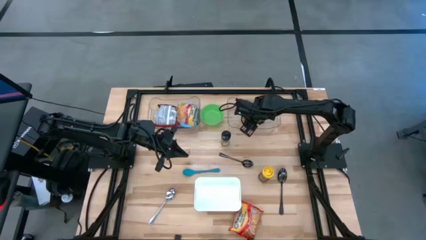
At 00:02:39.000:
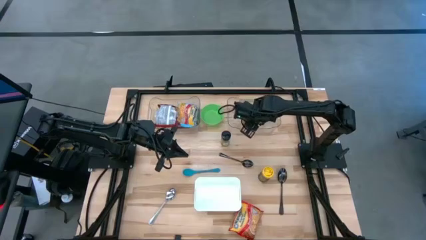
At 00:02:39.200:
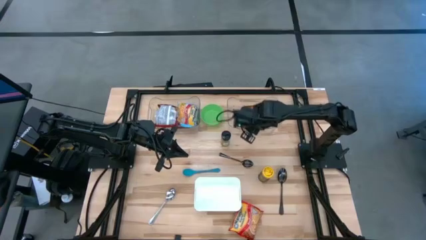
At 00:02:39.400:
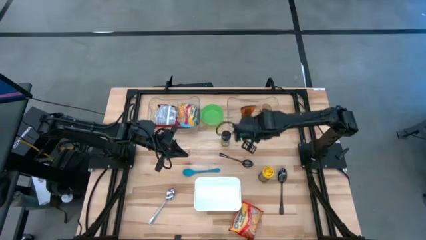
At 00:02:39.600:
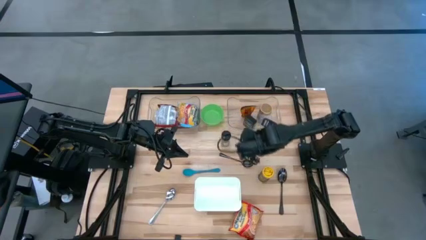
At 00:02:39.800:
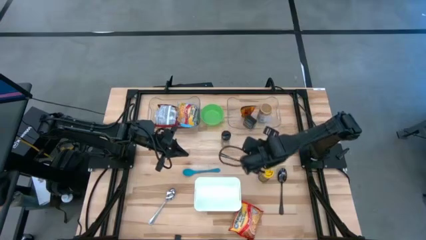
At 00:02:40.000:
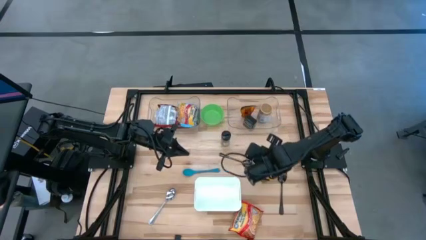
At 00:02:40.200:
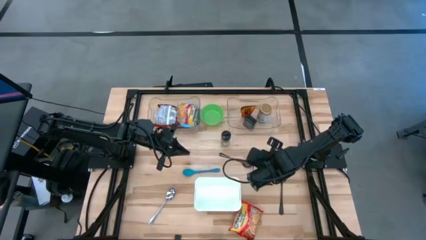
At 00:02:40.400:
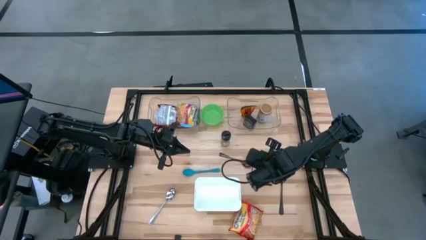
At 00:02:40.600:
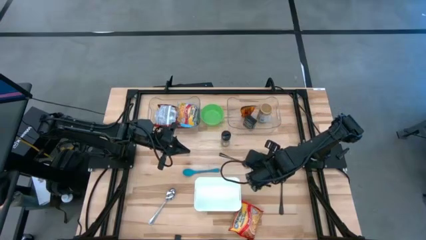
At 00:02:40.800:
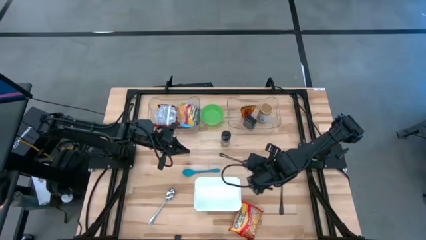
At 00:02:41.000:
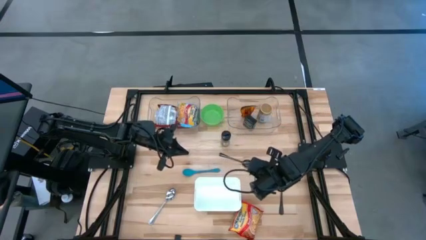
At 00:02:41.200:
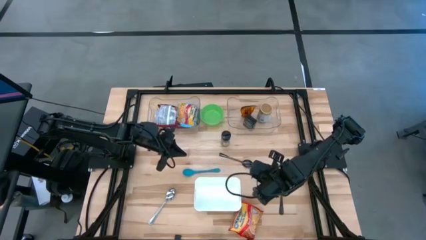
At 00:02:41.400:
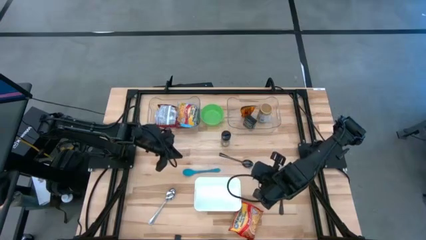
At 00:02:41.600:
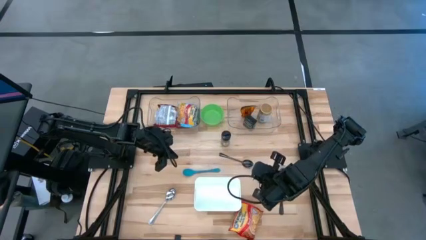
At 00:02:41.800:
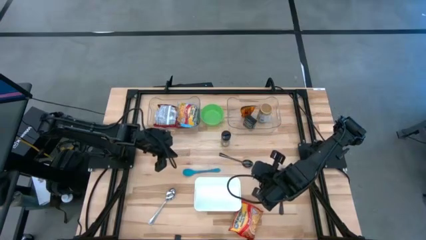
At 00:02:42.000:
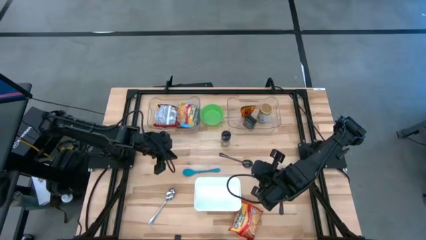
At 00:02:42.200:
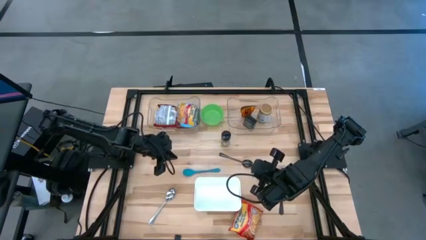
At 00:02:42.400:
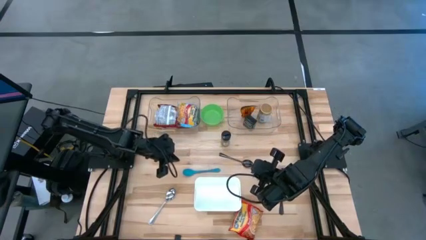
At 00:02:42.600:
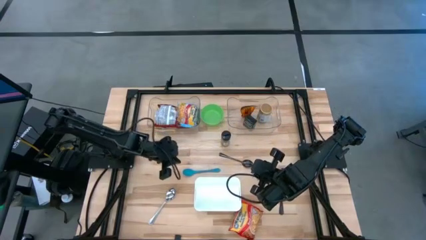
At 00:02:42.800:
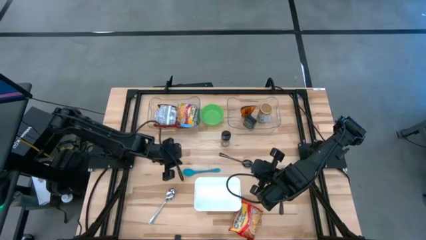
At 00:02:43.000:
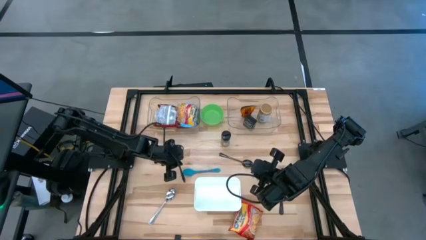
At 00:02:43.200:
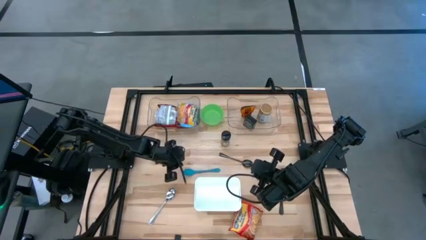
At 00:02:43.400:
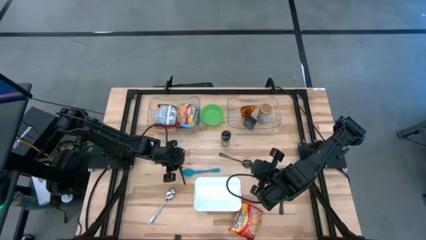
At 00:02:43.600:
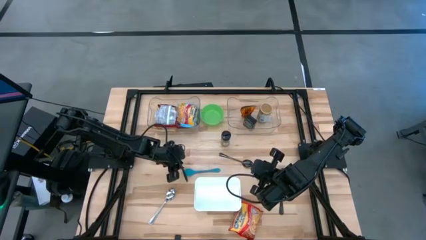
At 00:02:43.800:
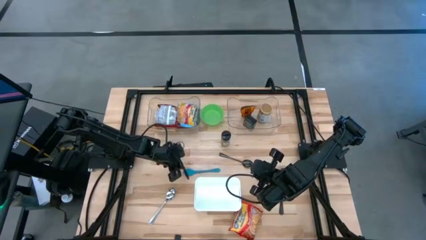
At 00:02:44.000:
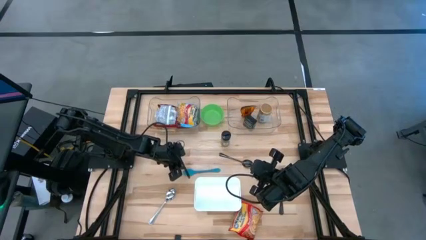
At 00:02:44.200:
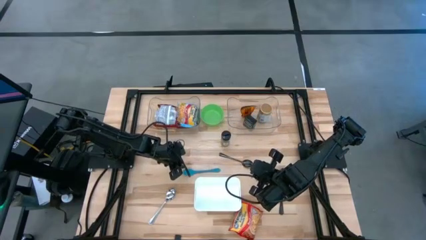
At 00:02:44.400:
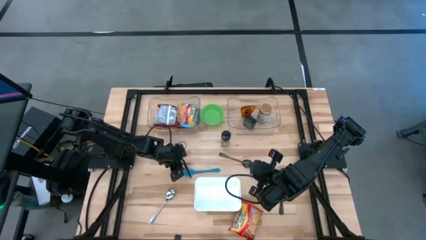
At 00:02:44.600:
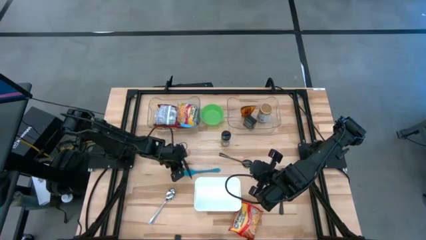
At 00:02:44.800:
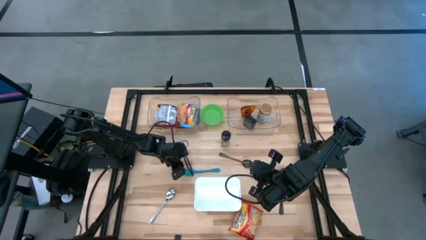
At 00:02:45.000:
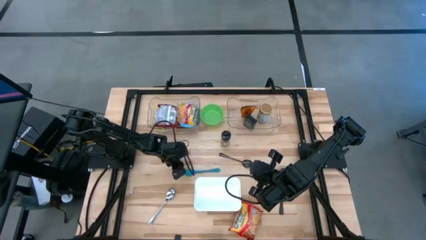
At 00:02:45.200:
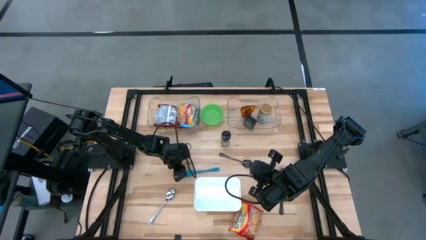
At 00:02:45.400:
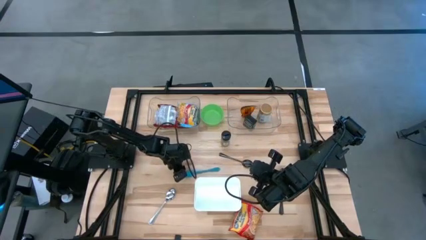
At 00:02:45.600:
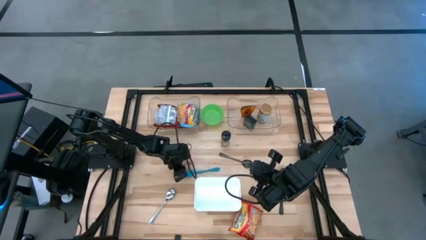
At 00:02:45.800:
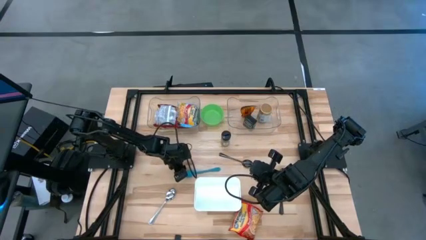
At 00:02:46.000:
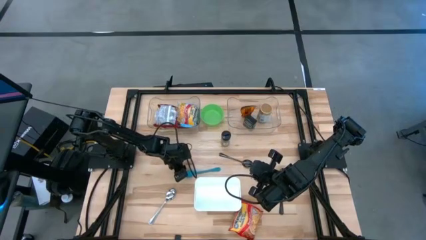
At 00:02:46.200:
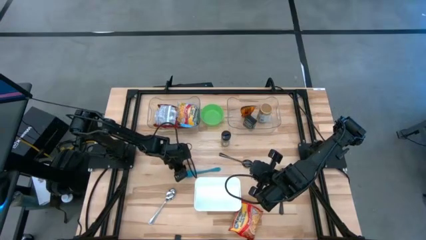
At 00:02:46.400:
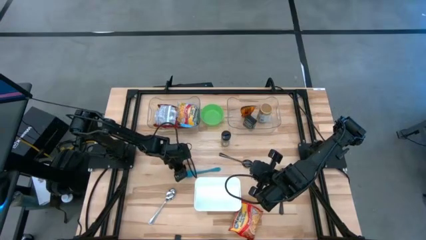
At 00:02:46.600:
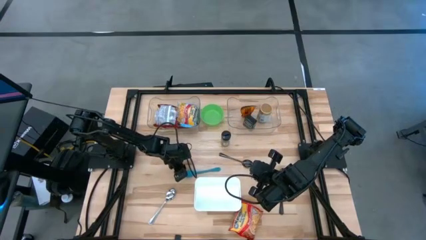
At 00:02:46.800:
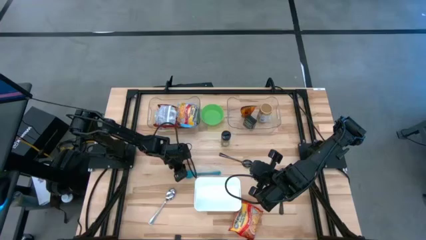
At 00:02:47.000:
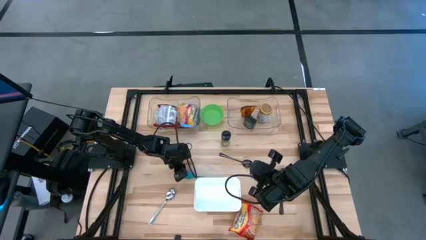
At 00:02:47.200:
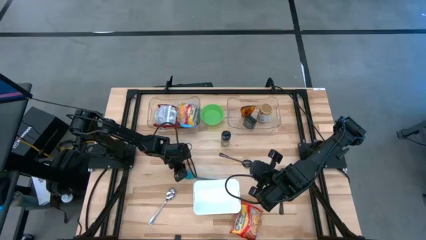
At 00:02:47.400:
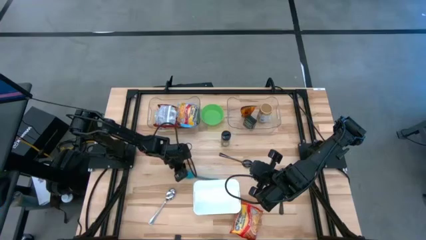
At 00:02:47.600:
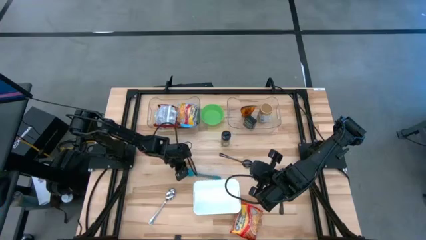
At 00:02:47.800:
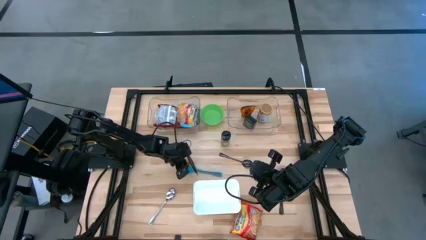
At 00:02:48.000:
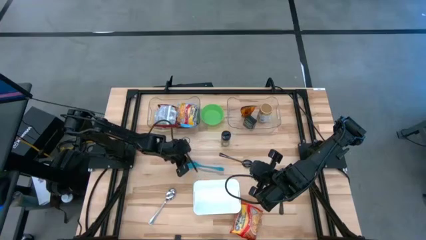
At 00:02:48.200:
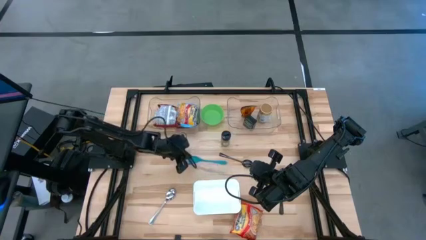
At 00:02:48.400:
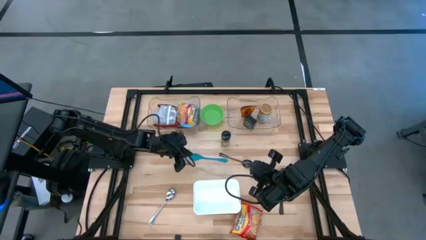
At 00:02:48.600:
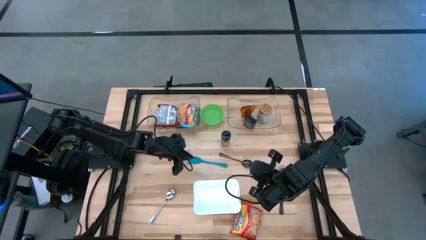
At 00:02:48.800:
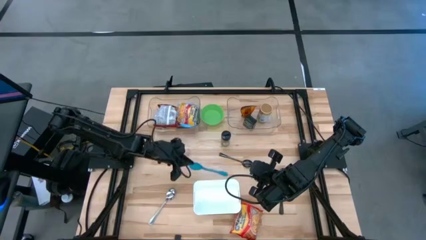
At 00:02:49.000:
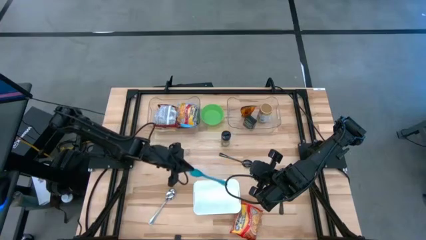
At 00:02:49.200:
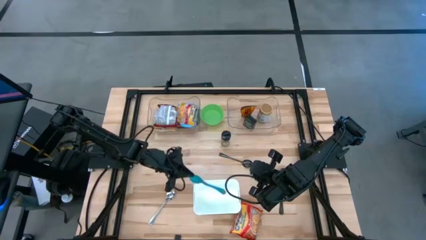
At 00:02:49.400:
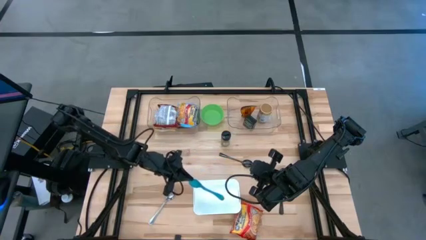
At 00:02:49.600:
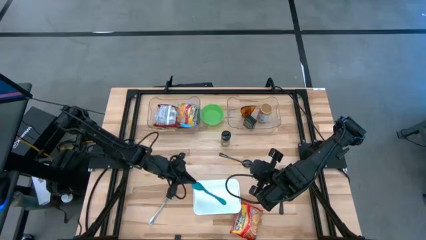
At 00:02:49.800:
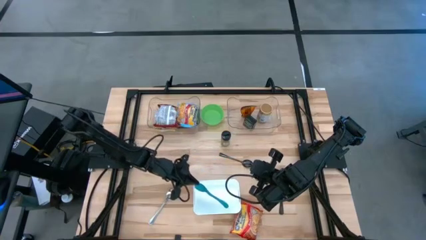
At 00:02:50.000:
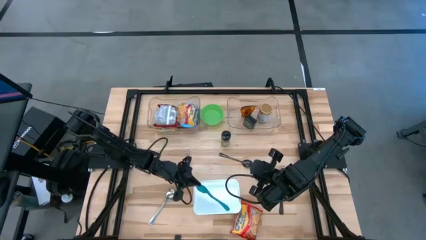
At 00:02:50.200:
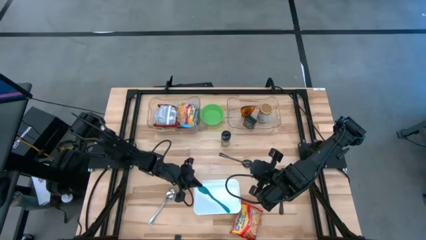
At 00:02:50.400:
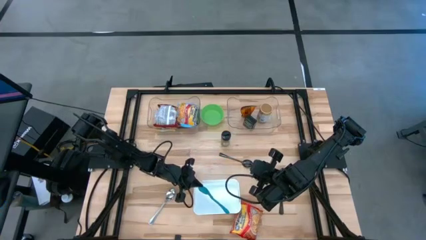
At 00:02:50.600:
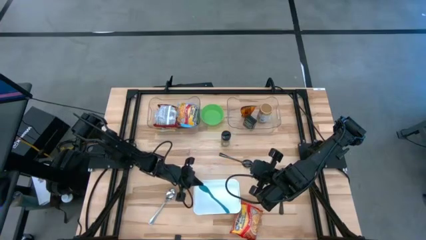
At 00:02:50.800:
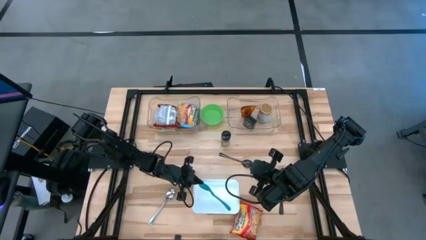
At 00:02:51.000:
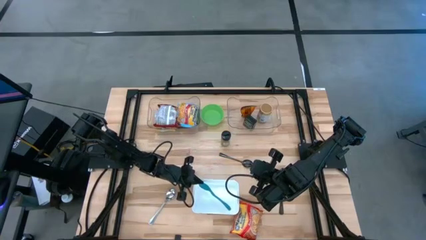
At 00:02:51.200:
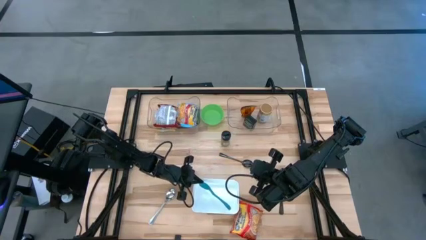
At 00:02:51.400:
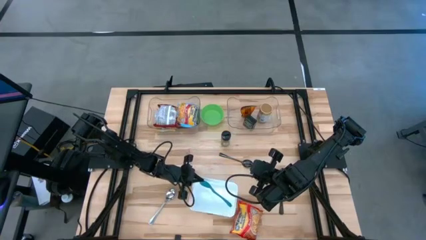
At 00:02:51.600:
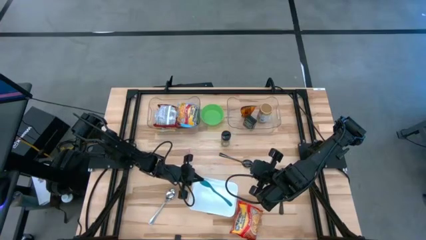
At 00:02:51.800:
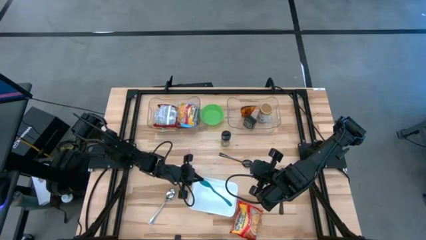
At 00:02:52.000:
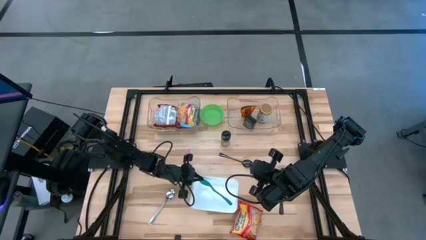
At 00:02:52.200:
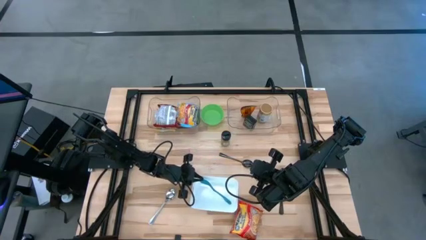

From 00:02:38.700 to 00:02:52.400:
Task: Pick & Place Food Item
Put the blue spoon into the white bin

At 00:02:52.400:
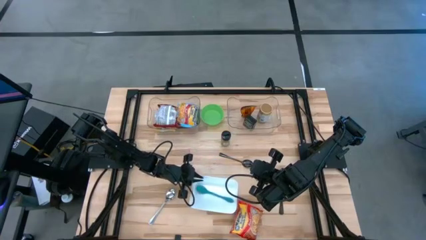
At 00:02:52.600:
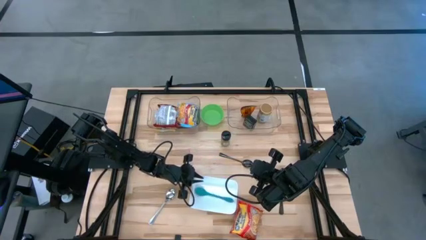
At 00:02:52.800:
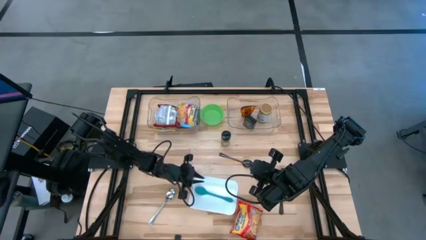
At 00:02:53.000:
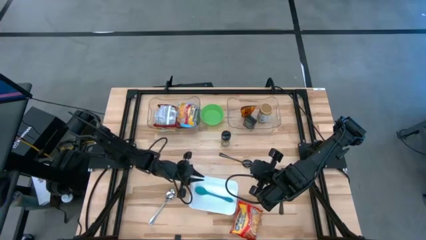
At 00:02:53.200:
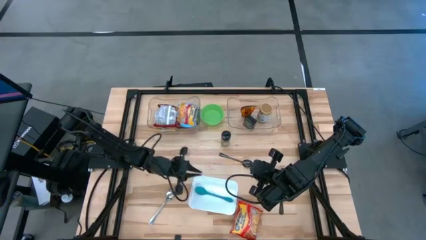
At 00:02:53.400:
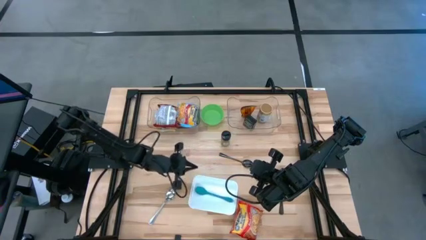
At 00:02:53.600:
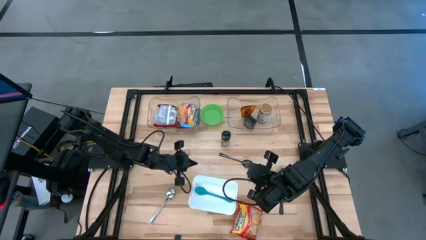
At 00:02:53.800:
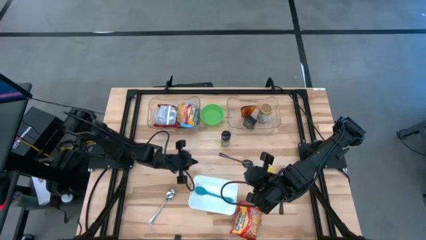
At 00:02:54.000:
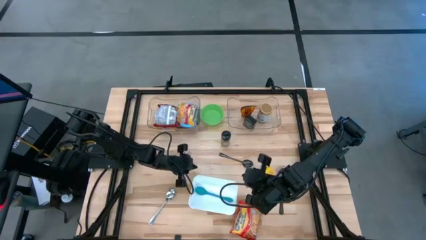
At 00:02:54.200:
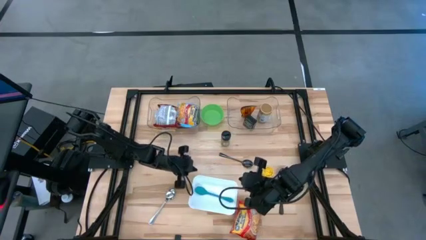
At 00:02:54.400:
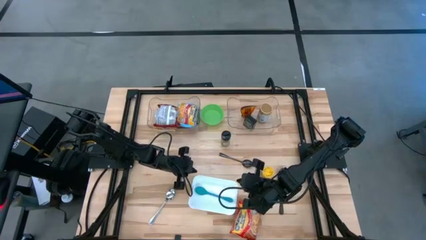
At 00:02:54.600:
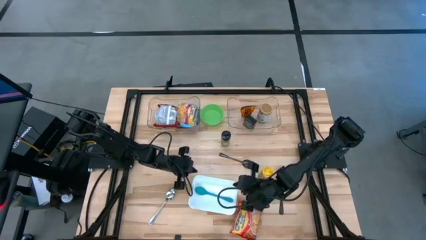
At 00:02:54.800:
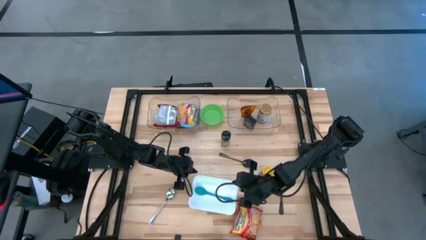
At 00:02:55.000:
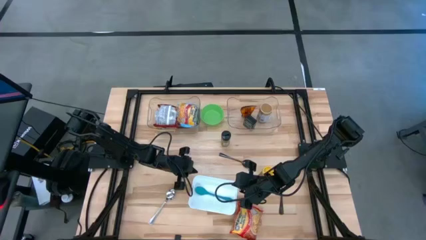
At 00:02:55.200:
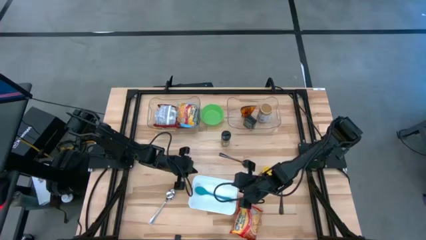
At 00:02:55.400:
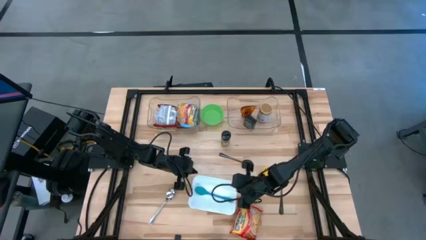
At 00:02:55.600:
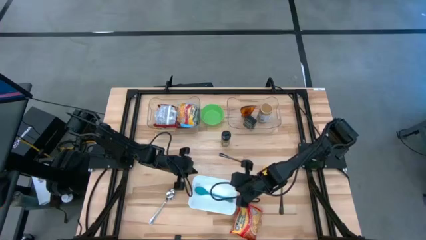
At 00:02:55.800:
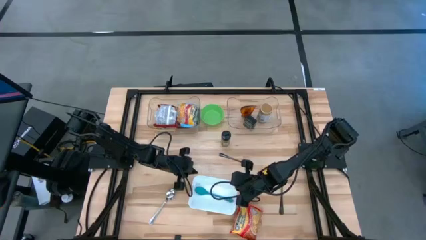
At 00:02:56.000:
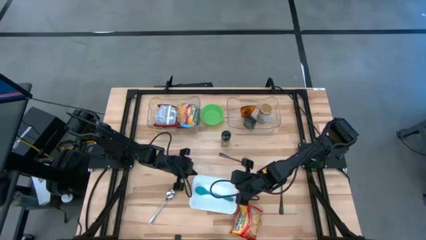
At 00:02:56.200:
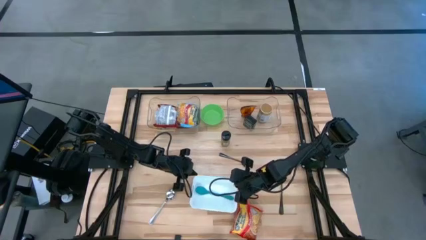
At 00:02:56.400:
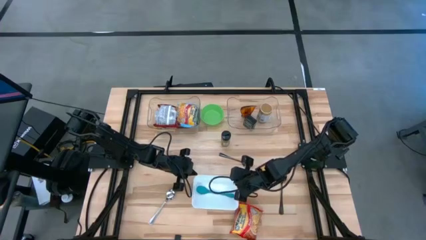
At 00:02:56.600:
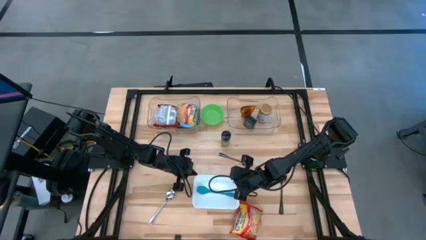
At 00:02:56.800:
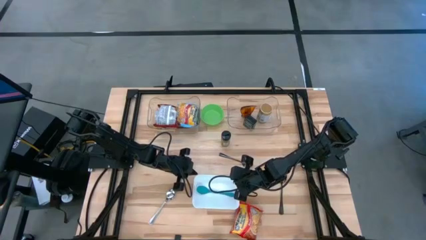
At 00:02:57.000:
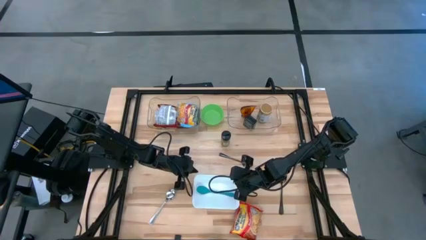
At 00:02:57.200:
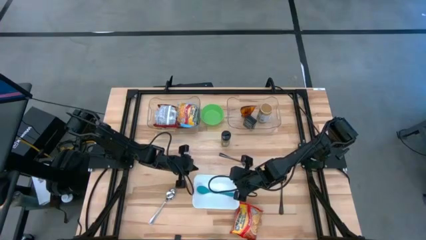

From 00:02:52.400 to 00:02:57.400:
Adjust the white bin
